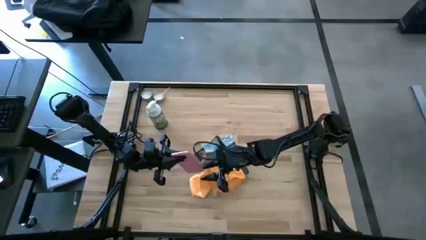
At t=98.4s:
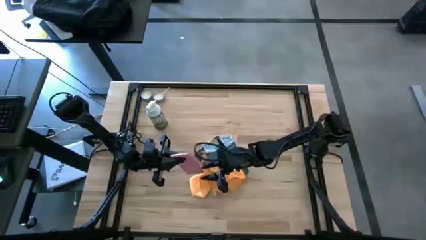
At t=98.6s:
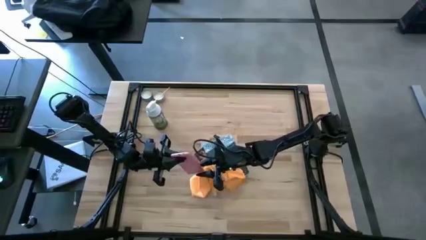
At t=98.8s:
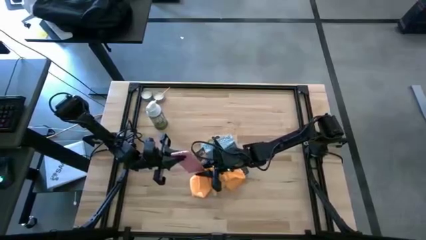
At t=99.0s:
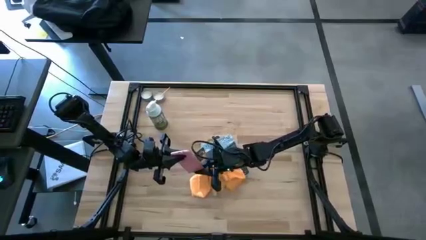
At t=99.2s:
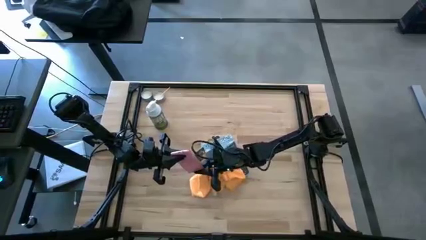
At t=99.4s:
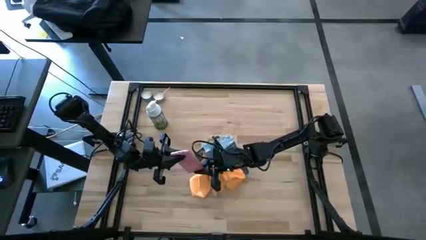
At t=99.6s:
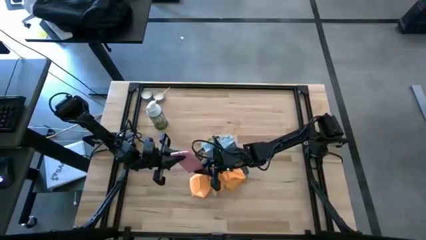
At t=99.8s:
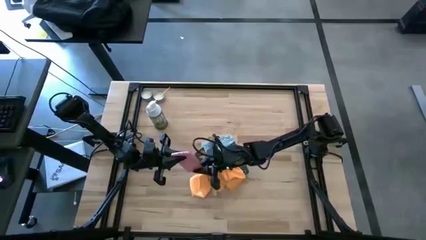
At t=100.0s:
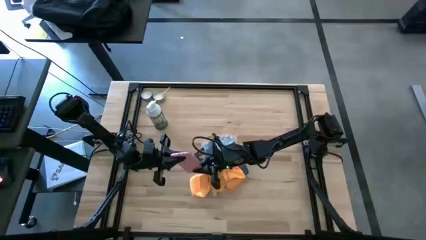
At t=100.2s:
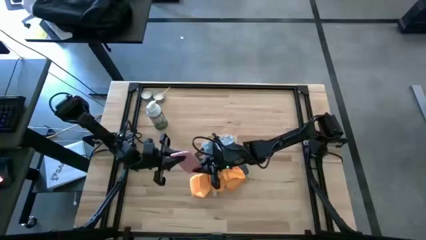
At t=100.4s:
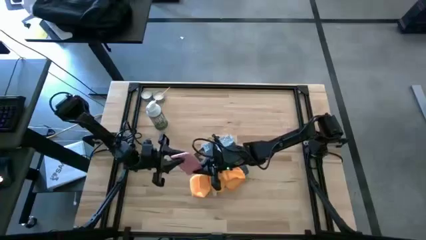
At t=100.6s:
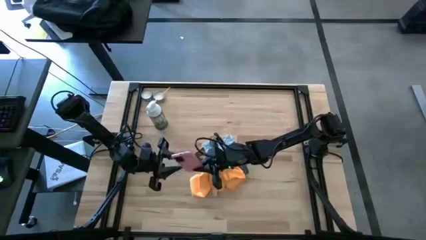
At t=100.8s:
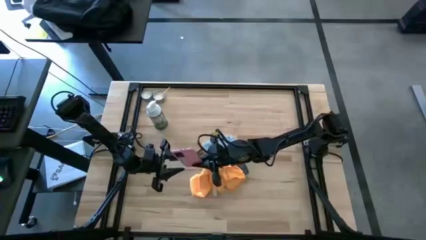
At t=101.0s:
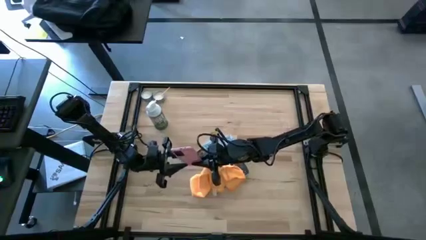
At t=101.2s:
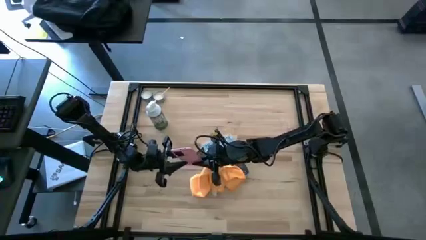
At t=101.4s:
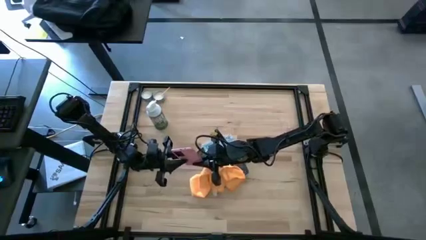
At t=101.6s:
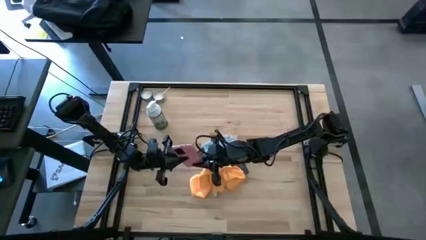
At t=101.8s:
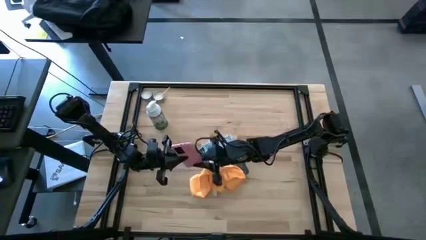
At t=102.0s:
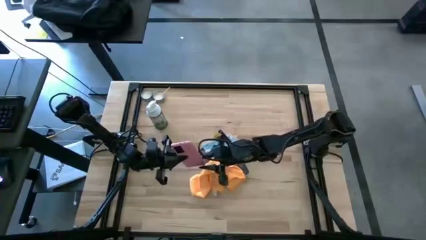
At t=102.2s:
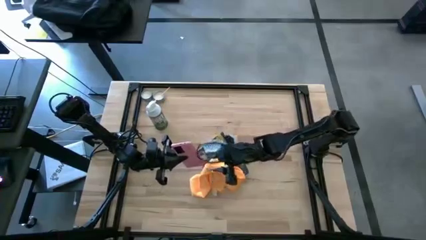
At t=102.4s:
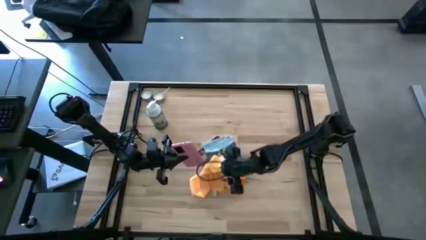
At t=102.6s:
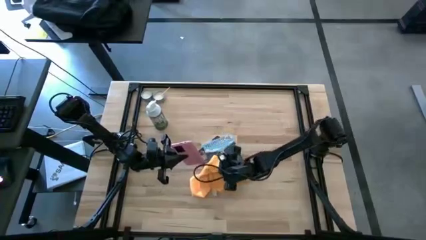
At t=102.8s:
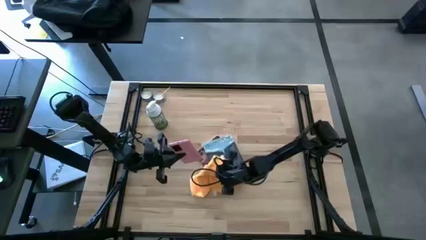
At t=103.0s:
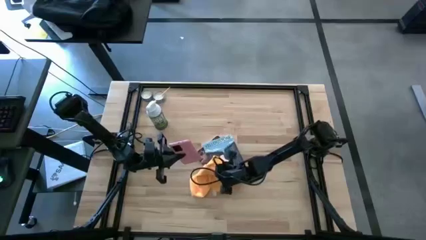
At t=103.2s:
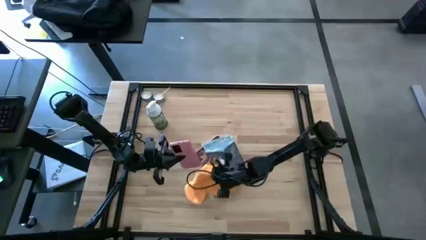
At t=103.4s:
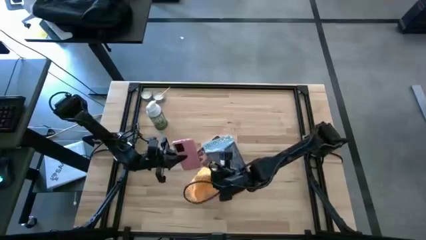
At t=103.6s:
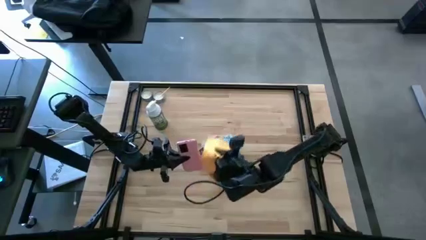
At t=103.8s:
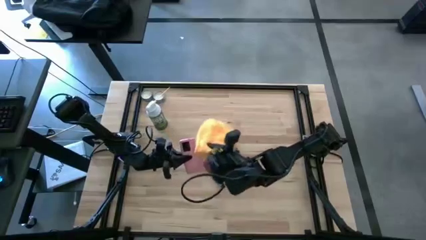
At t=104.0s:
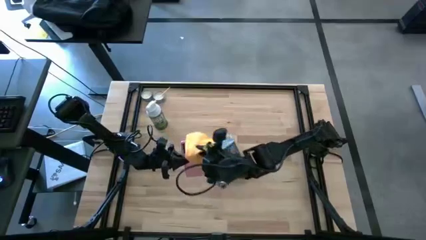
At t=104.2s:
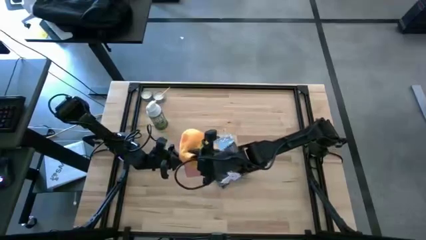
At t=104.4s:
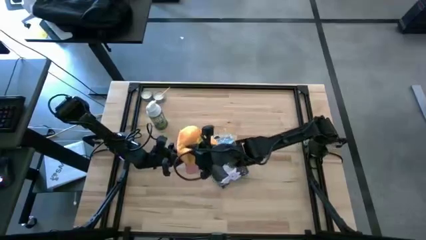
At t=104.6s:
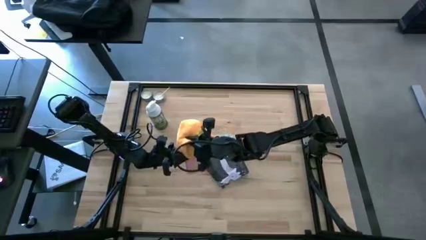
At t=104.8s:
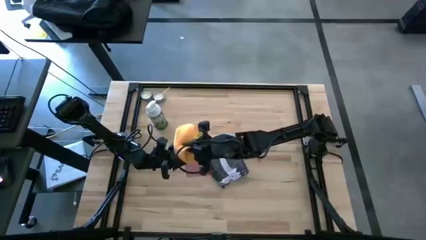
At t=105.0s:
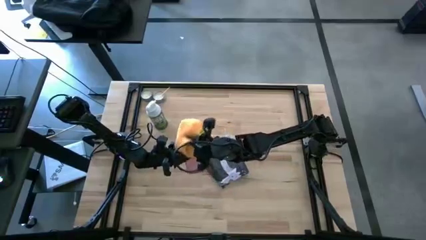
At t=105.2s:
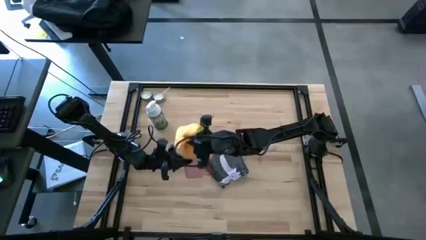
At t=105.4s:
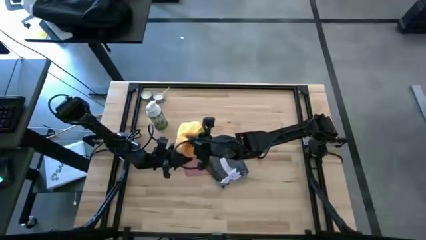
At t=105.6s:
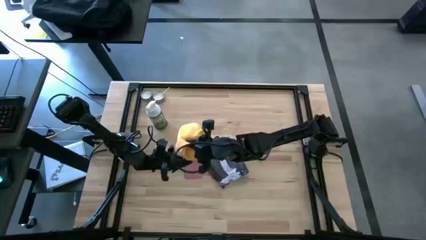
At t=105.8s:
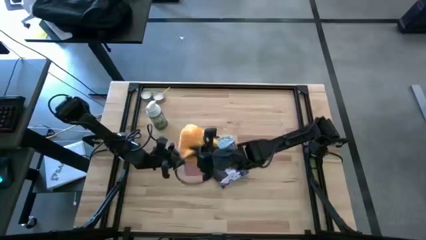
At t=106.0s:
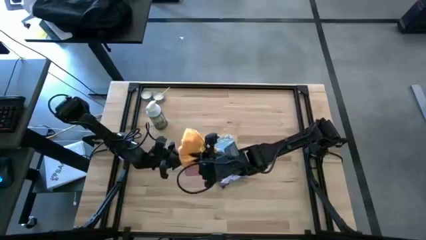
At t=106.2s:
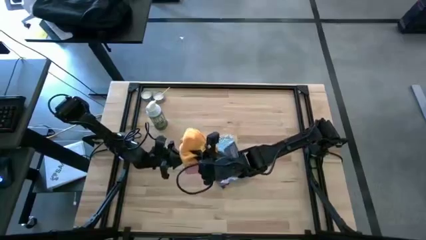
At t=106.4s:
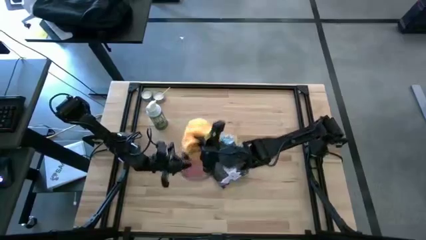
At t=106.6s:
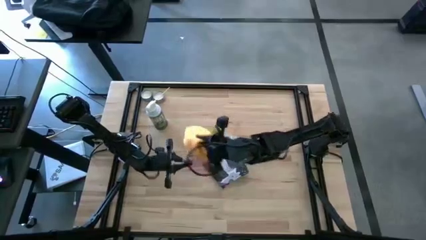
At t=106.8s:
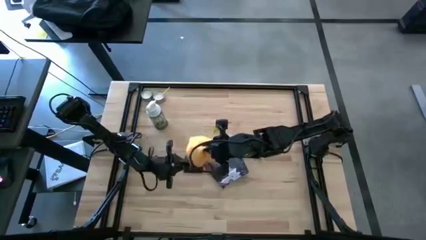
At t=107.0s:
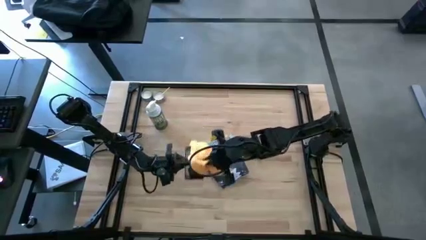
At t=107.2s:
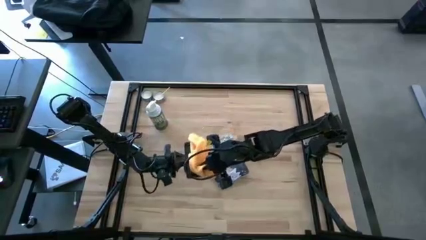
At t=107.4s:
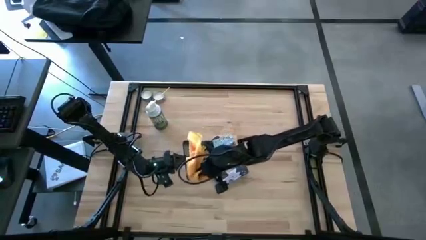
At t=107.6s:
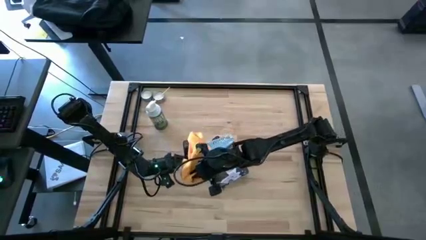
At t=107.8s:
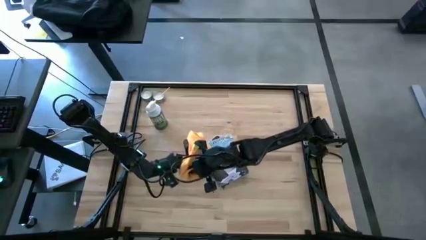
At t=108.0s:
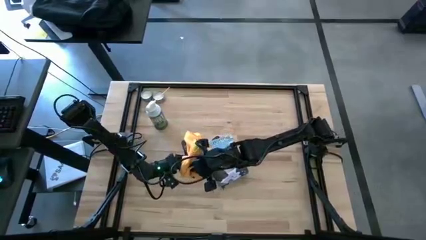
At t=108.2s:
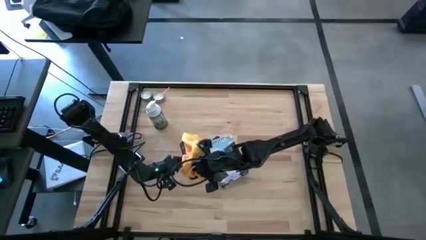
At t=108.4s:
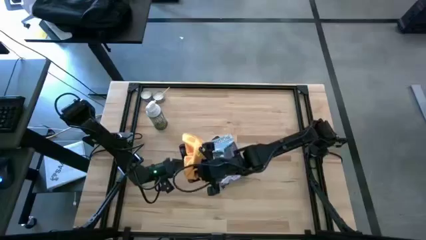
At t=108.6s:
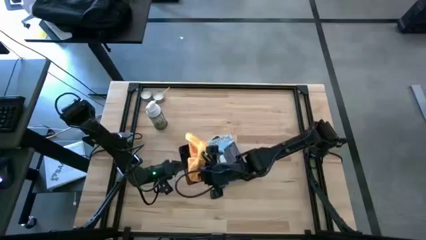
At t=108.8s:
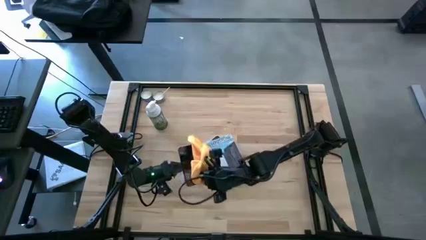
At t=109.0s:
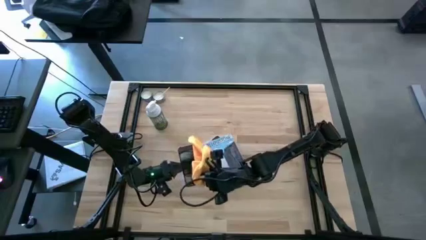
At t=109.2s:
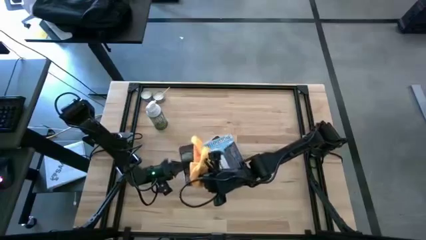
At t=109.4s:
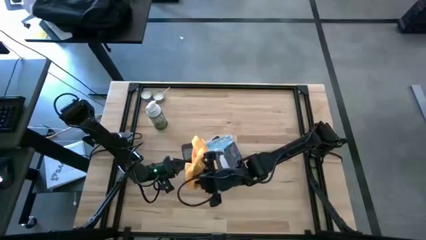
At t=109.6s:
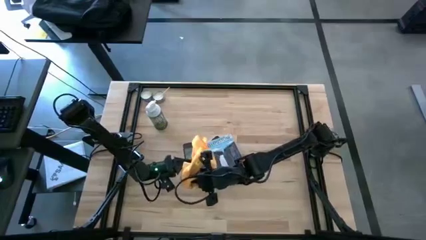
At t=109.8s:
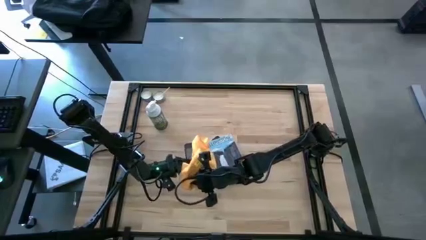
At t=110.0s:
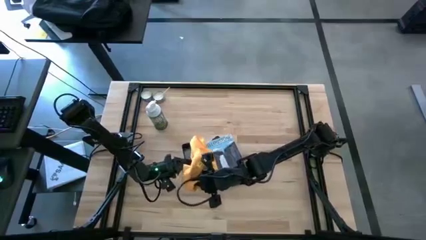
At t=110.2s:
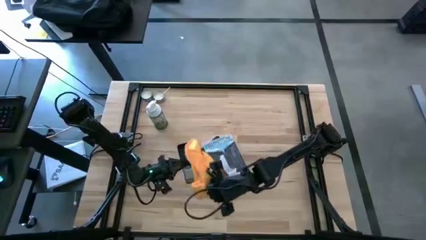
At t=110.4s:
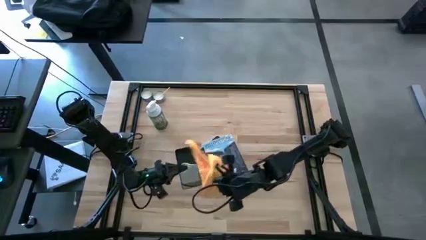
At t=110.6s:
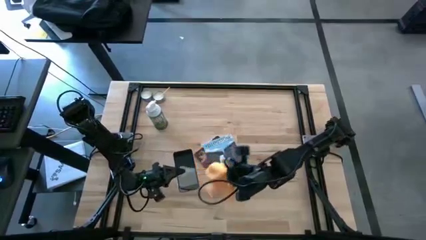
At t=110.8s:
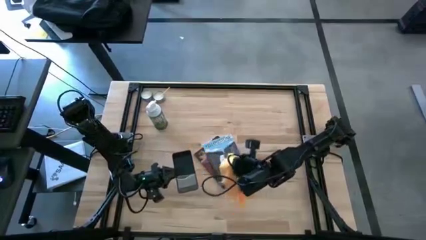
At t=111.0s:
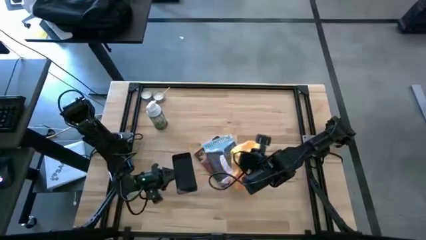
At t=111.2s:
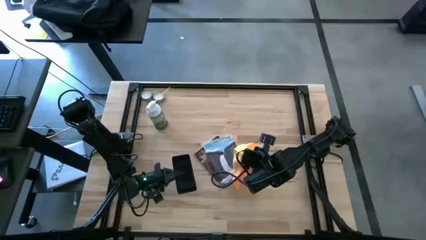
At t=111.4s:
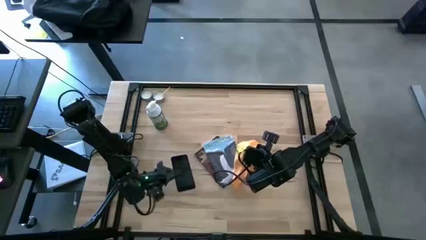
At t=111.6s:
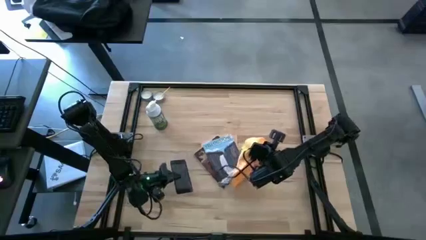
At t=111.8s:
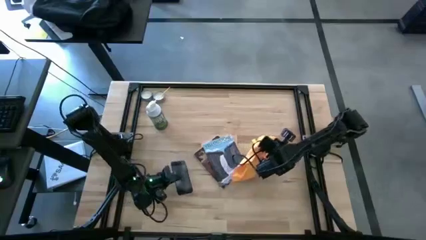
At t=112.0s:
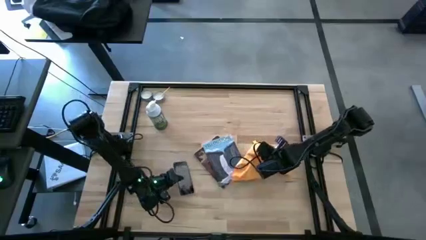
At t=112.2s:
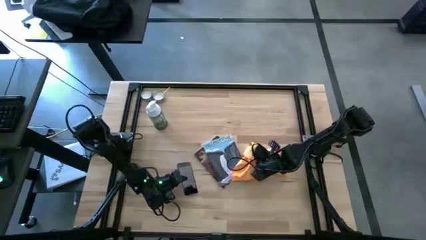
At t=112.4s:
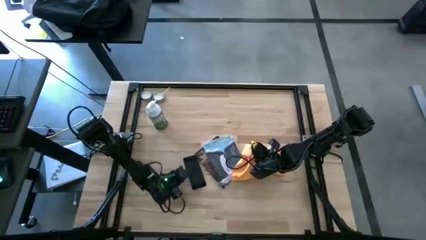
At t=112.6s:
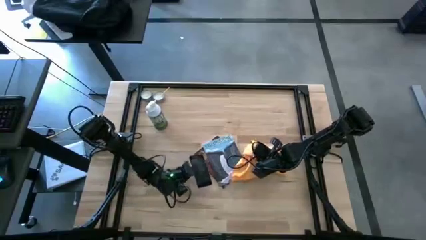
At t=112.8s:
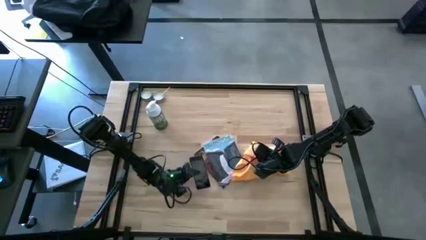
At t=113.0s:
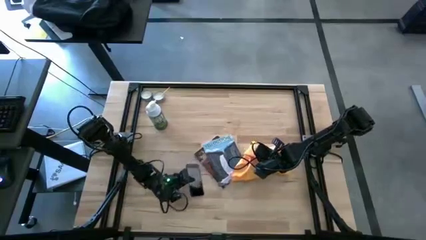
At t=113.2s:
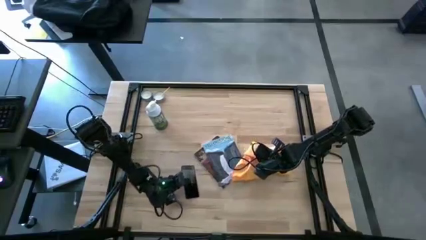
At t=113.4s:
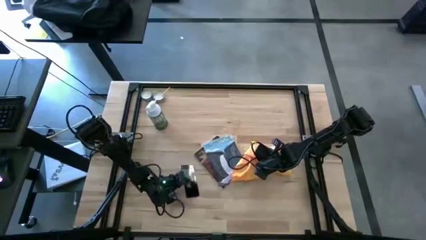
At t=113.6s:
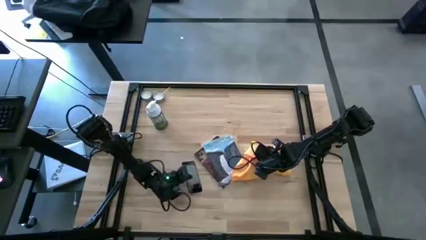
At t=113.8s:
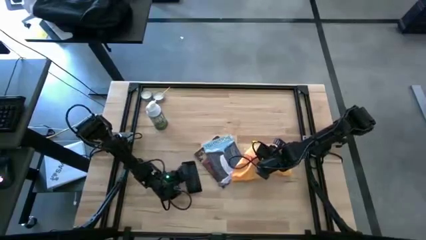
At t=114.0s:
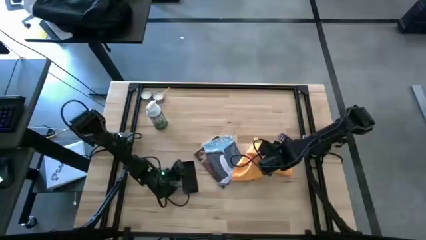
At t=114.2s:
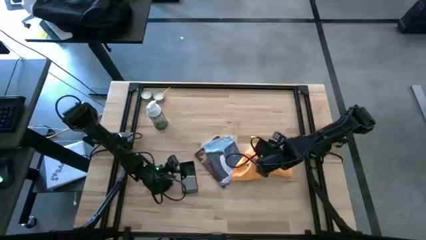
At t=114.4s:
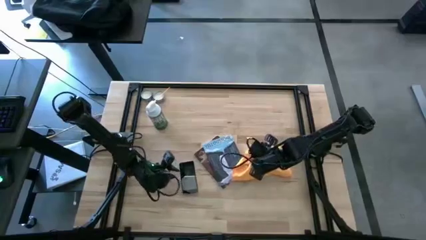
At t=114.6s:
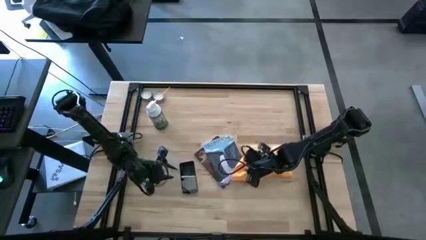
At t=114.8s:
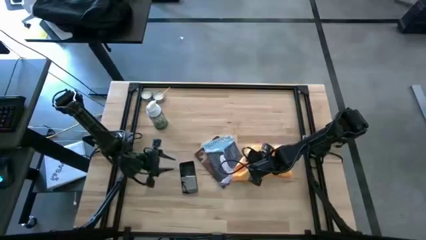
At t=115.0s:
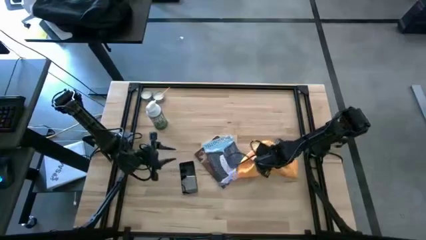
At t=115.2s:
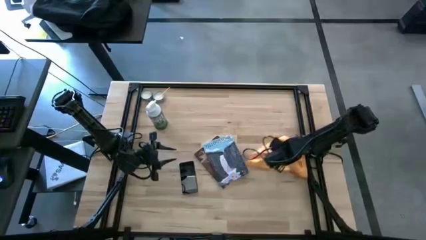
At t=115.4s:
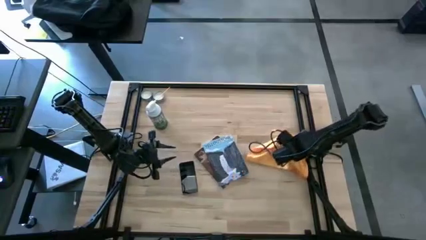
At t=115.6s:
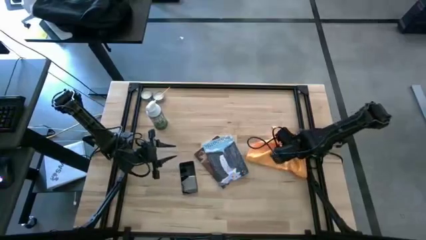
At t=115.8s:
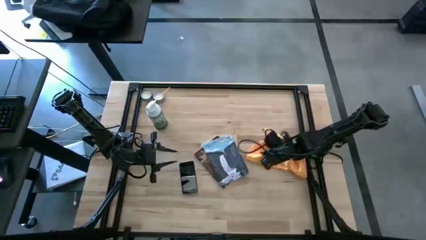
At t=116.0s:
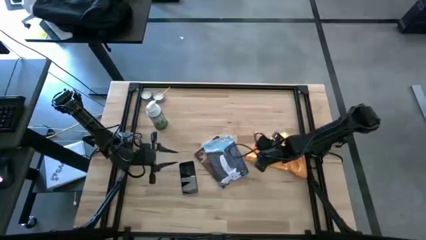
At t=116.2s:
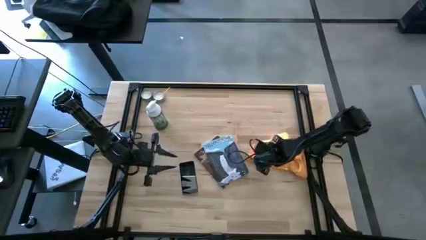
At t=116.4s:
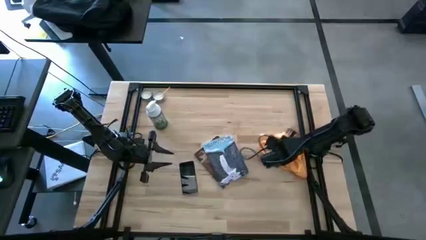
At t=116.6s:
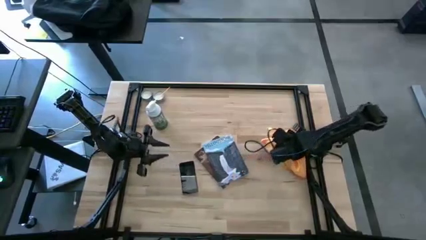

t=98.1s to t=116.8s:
Task: Apply microfiber cloth
Wipe the front and back of the cellphone using the orange microfiber cloth
